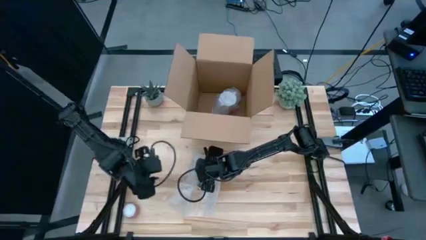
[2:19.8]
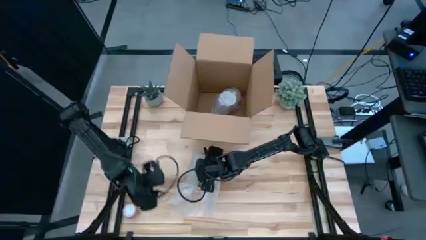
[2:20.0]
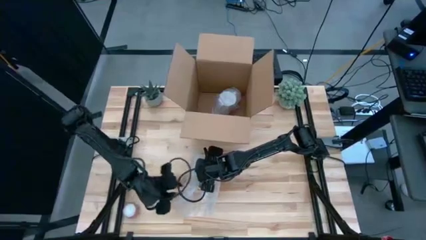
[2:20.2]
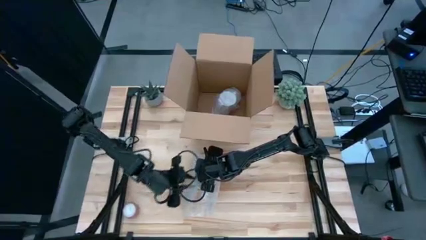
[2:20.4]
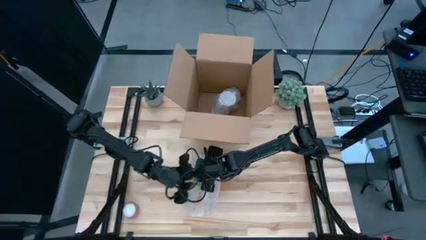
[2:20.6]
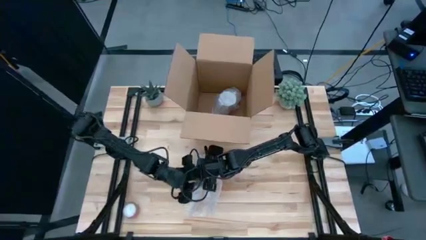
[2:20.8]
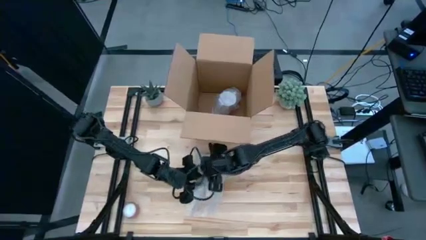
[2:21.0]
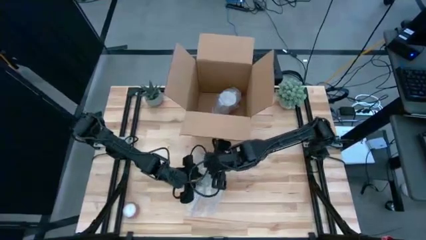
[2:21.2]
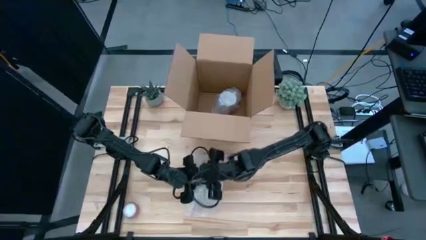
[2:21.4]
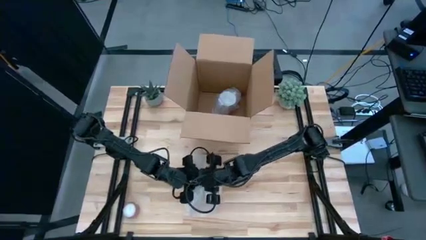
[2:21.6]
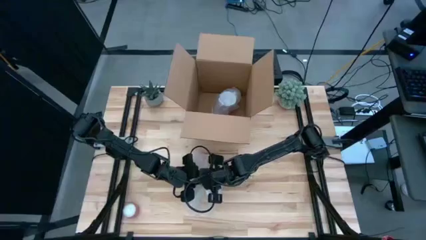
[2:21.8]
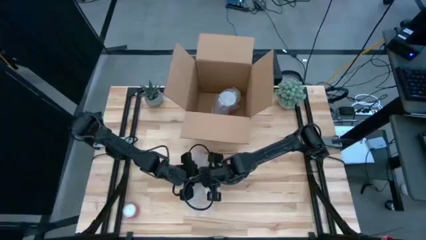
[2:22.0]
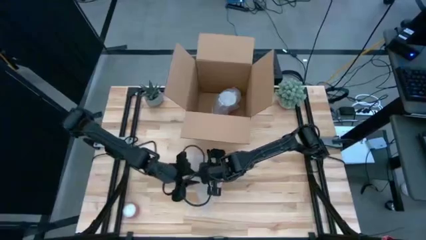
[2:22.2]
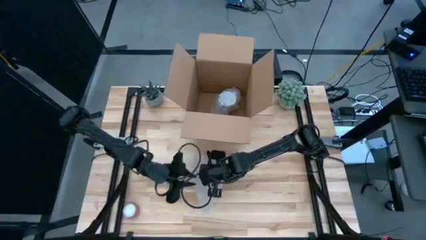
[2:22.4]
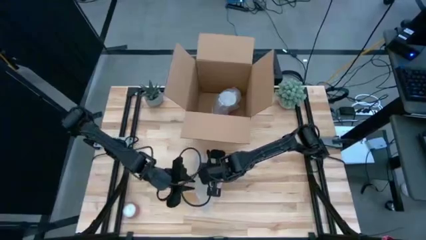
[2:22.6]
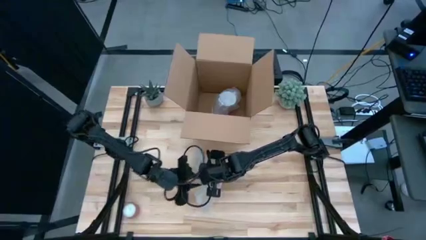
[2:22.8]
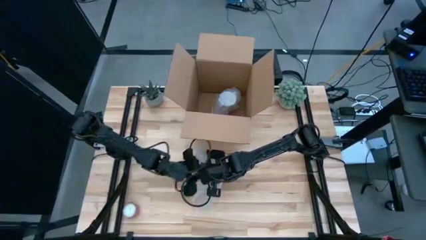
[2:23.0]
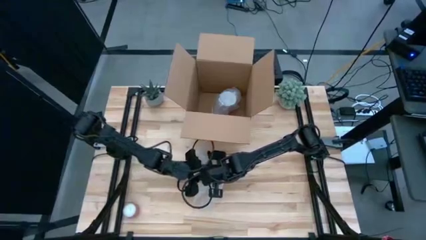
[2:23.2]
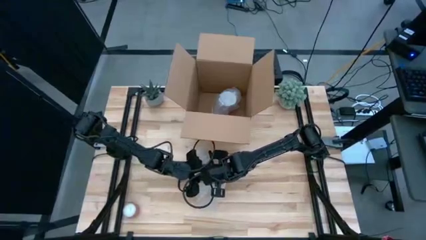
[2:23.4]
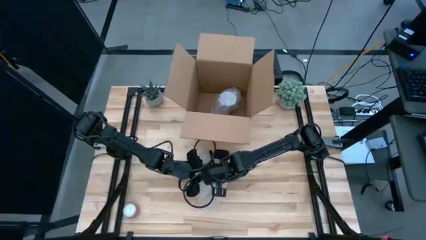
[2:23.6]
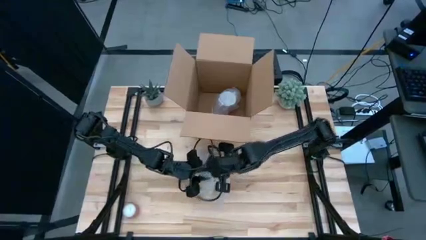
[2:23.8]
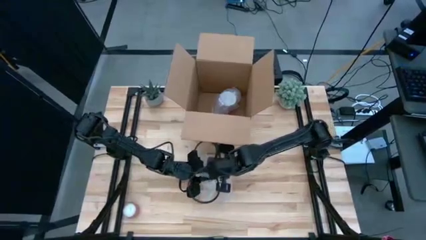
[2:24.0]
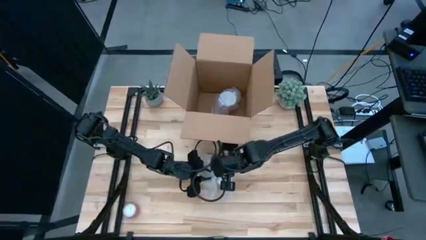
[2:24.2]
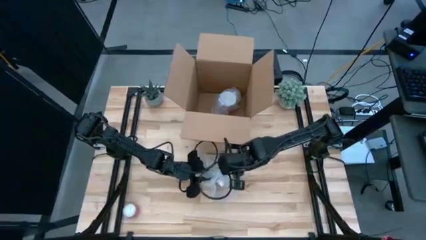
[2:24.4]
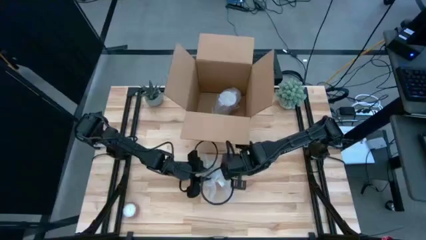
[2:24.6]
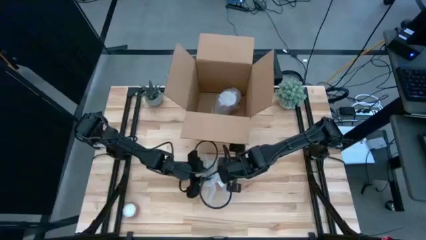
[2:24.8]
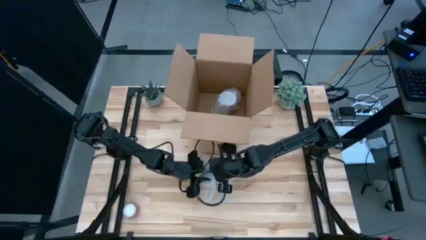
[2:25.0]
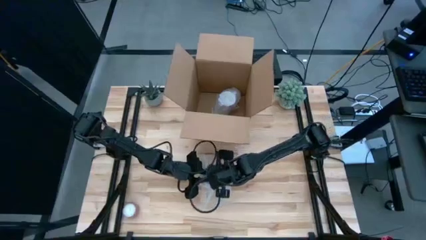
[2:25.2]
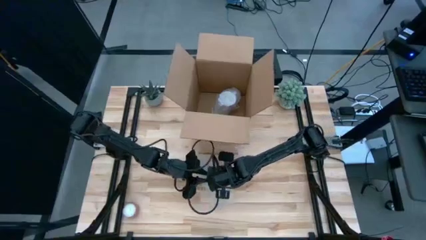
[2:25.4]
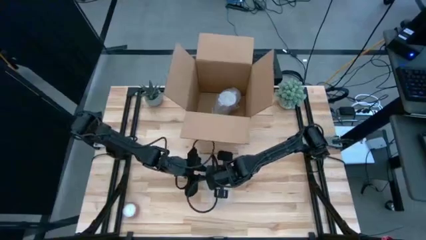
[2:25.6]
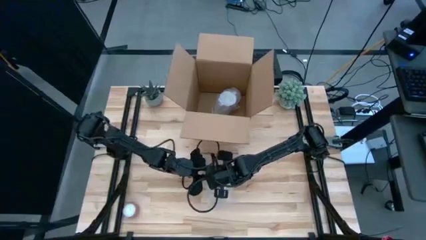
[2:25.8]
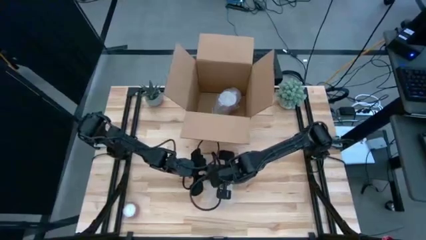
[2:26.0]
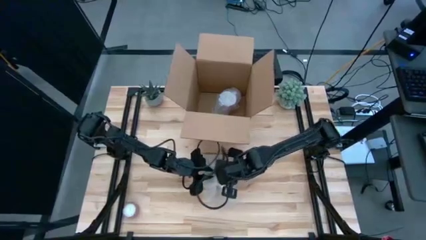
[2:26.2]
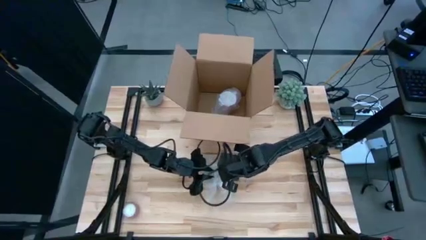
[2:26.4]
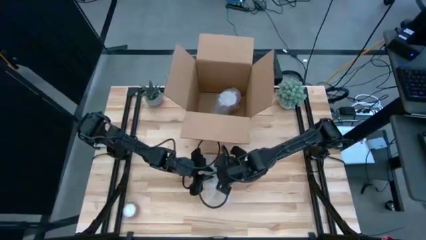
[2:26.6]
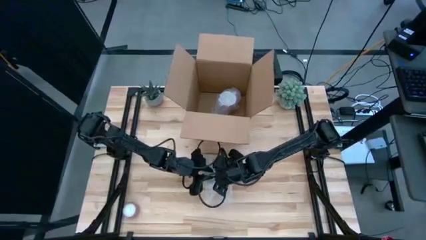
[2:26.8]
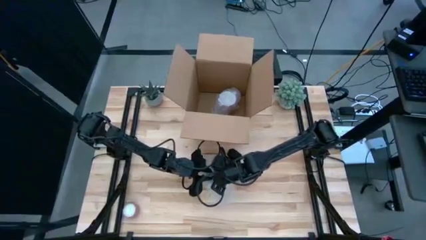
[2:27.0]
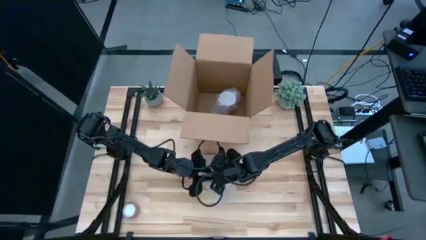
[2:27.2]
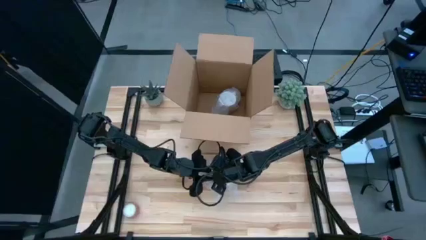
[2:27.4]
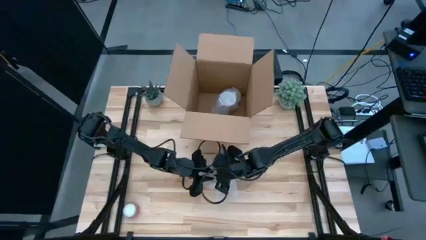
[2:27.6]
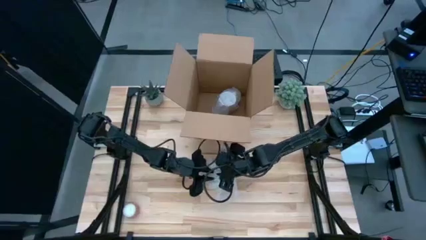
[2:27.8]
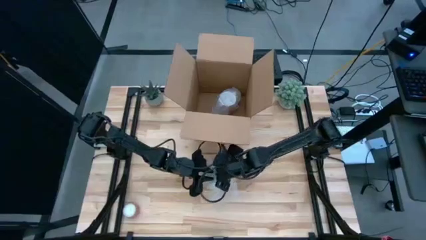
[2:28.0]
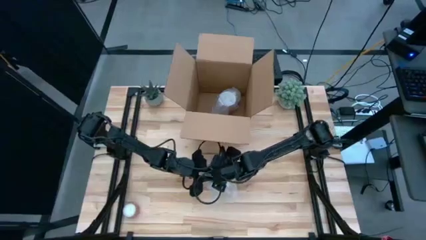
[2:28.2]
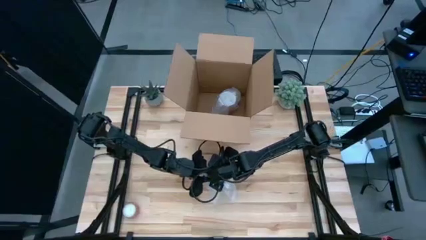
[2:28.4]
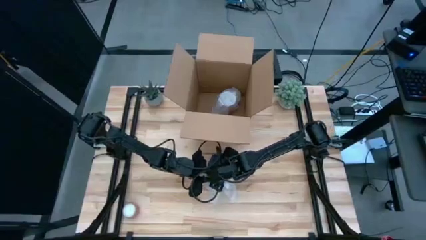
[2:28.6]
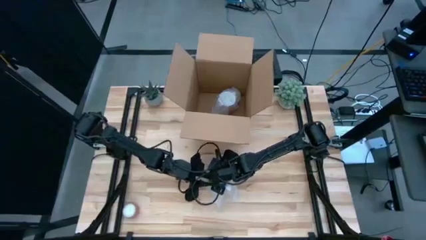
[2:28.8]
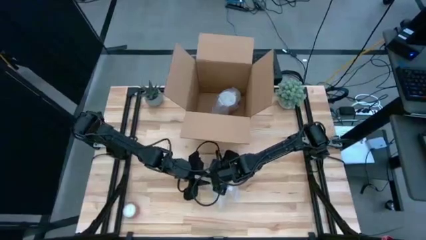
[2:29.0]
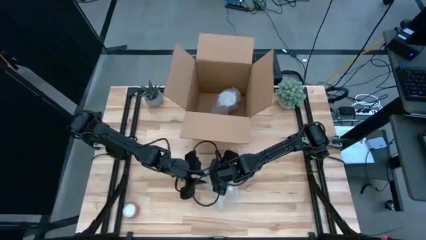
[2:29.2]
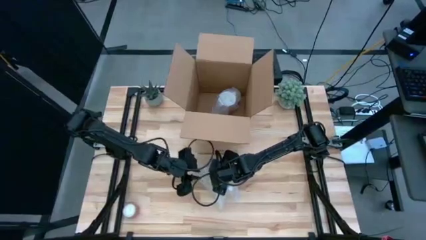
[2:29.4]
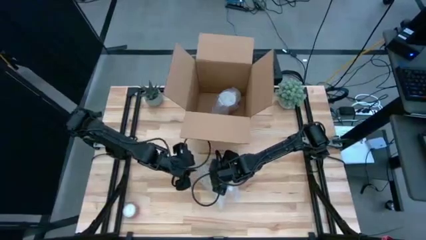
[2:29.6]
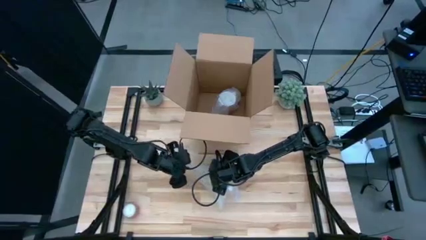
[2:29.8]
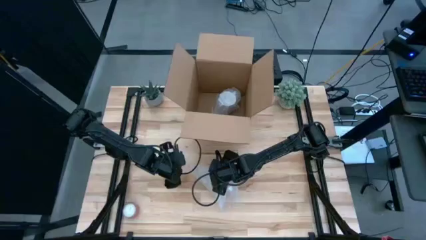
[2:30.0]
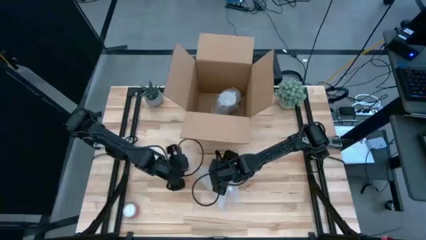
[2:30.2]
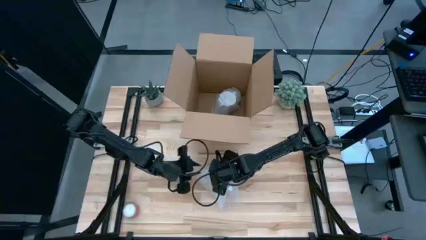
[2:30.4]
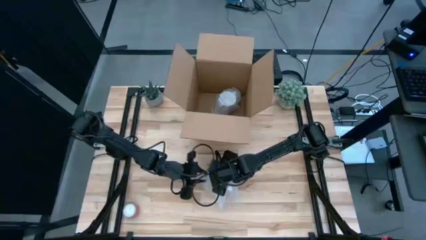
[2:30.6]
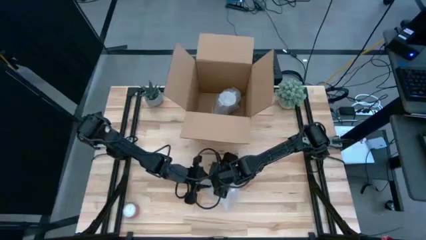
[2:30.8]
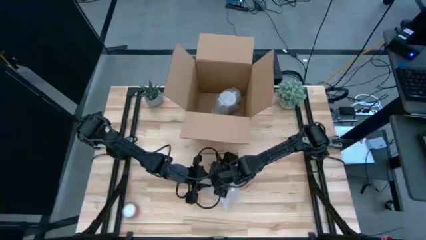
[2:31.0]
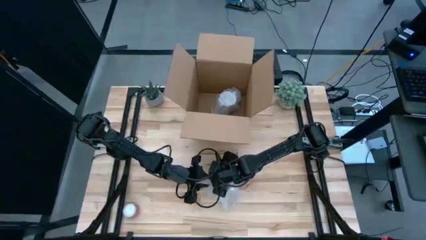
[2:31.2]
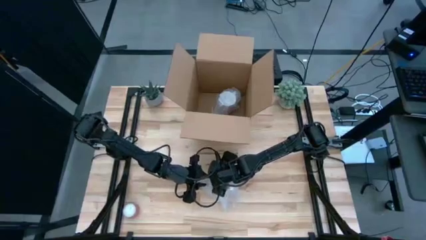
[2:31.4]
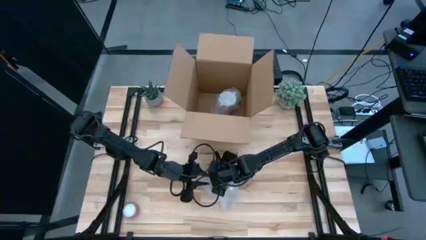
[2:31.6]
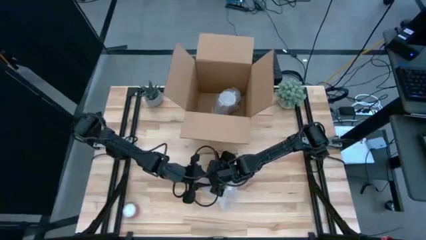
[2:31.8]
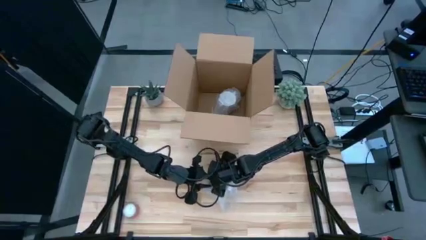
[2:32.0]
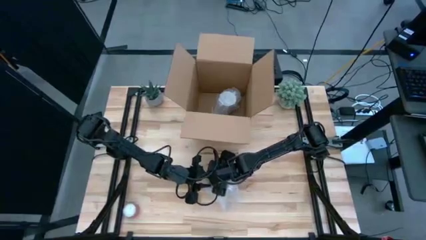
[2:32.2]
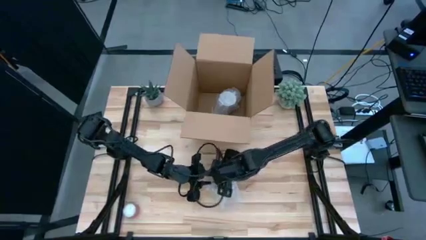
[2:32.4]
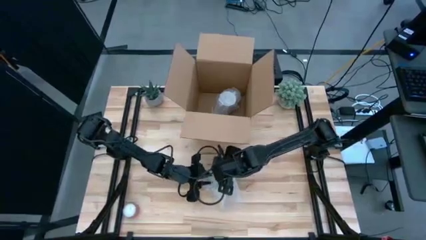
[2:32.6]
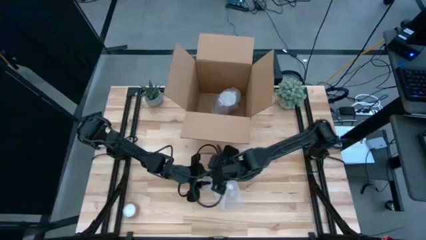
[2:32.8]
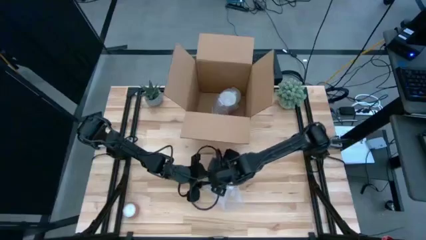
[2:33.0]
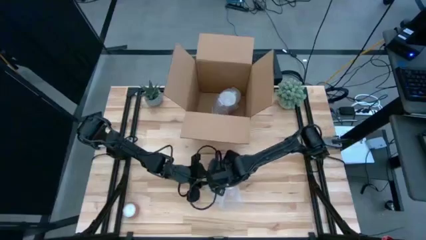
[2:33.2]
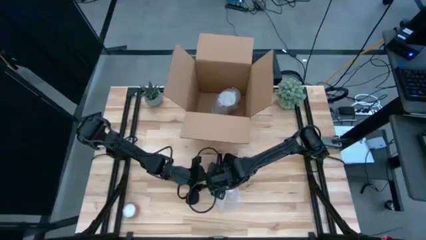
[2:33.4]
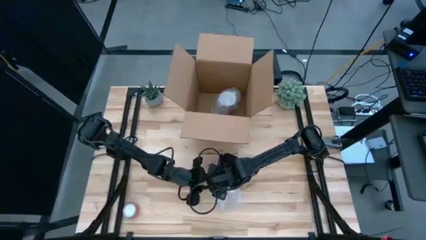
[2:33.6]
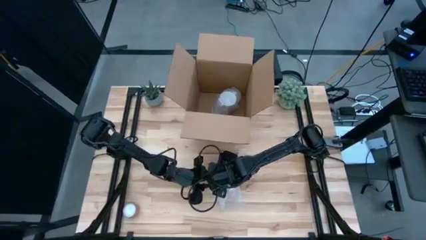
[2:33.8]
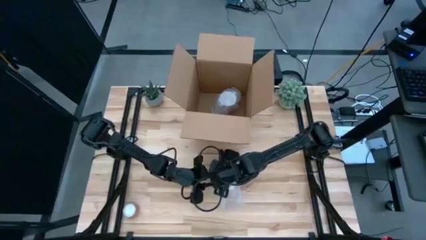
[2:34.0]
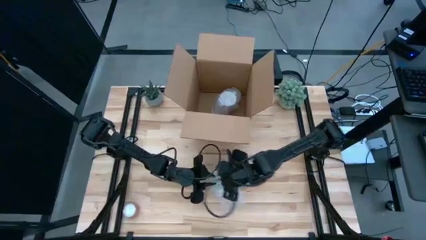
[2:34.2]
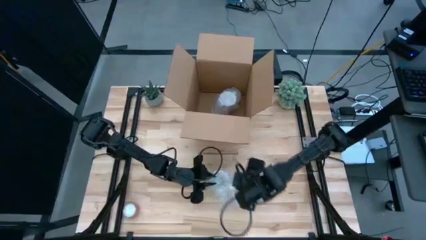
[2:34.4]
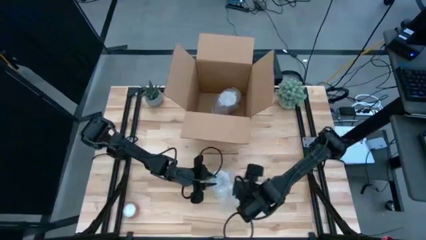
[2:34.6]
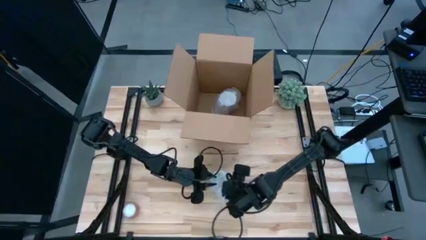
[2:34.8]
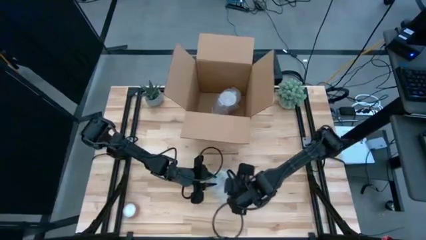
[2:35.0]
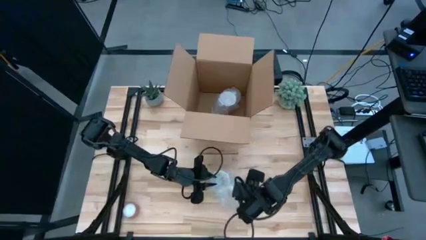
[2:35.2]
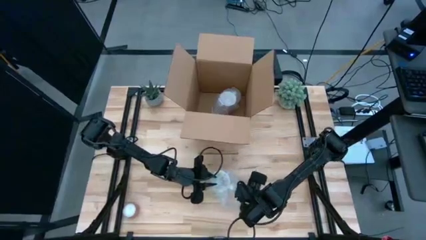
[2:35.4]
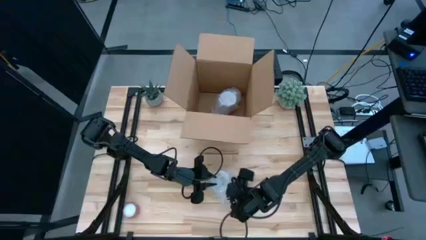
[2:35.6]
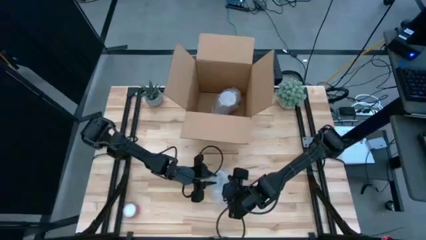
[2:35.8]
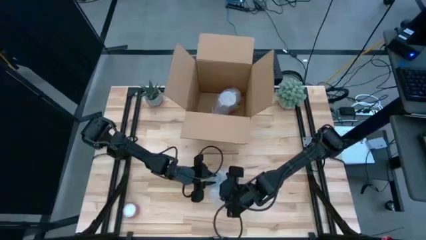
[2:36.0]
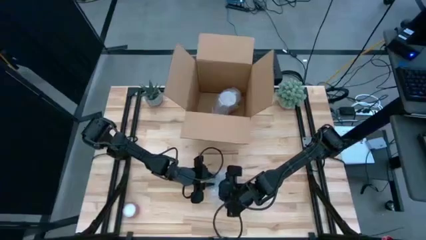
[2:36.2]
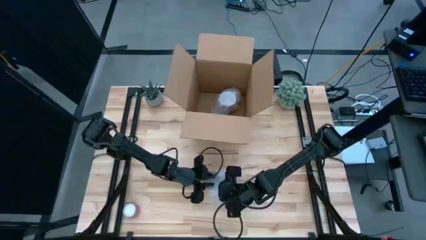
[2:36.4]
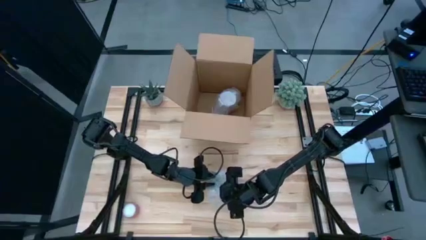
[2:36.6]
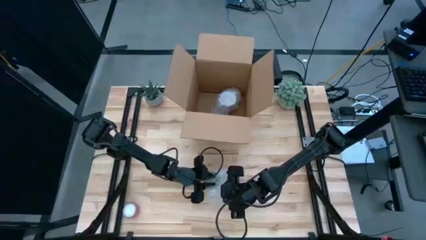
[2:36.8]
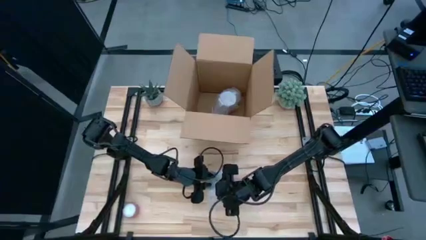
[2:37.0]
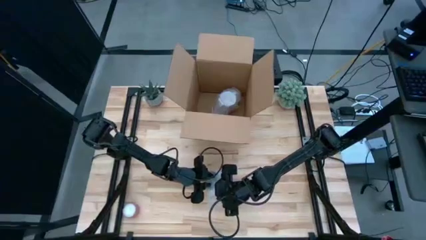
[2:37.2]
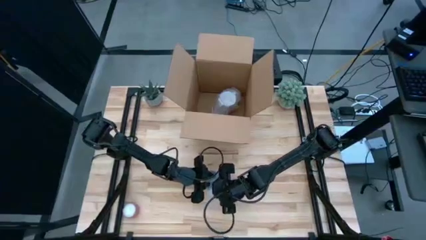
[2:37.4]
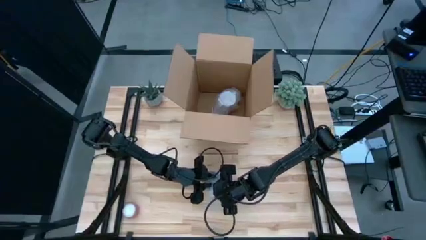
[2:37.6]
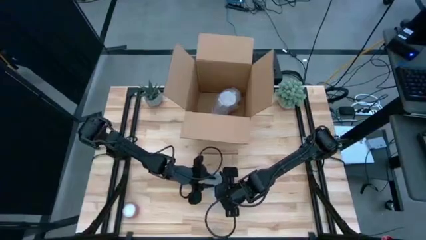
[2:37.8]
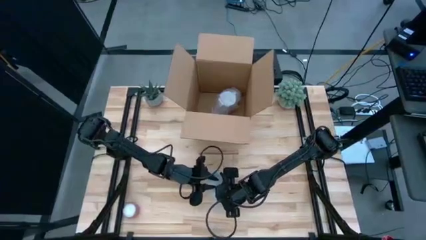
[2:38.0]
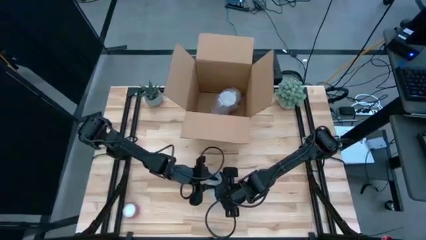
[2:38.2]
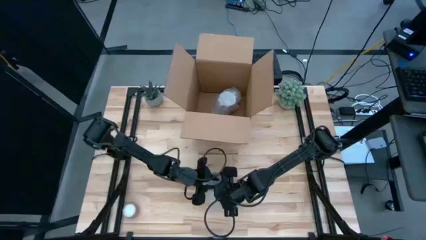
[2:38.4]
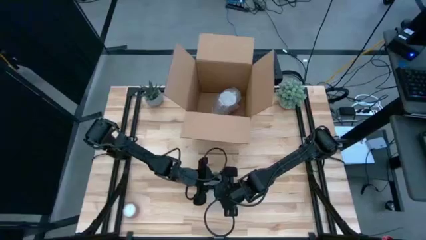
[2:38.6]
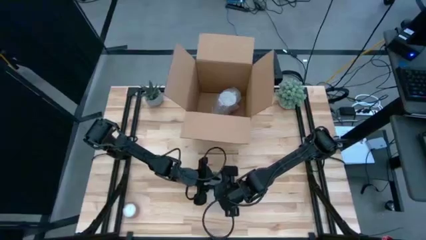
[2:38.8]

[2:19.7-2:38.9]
Task: wrap mug
Wrap the orange cup with the bubble wrap
